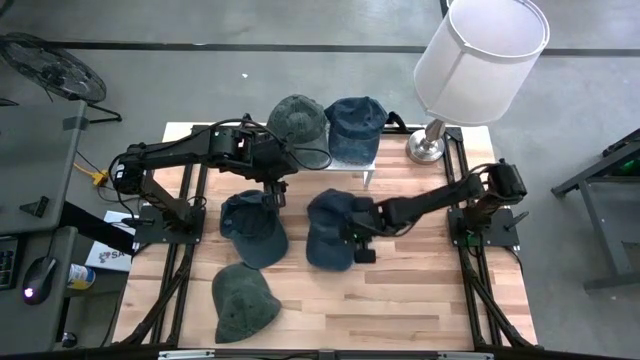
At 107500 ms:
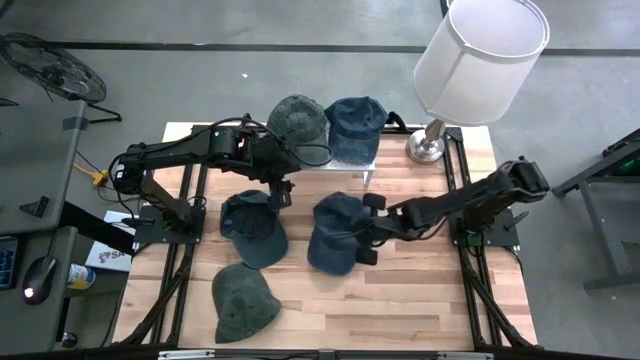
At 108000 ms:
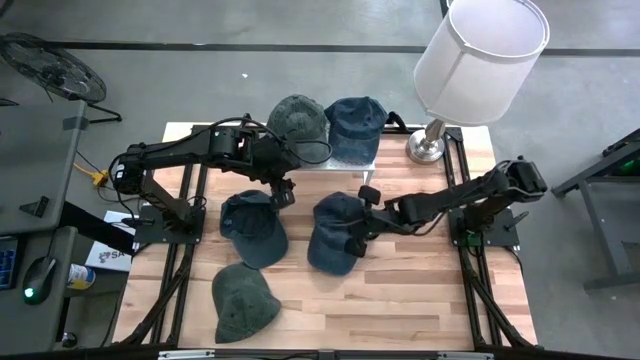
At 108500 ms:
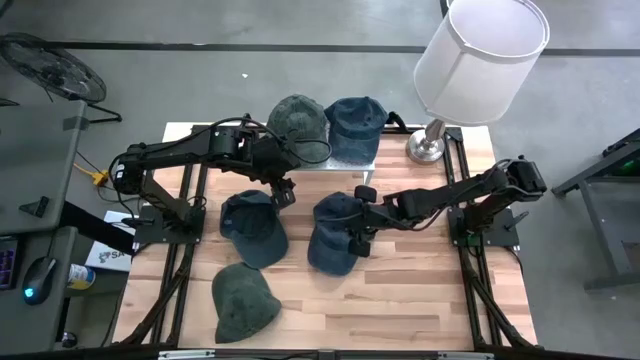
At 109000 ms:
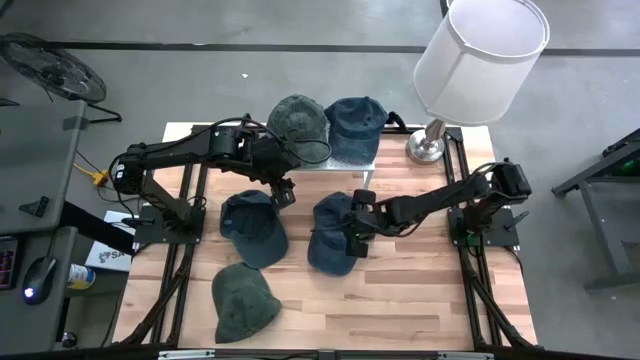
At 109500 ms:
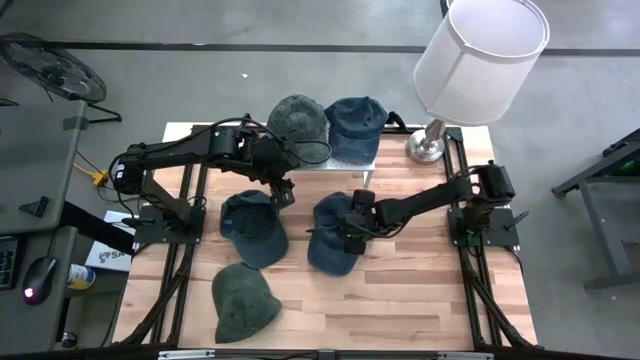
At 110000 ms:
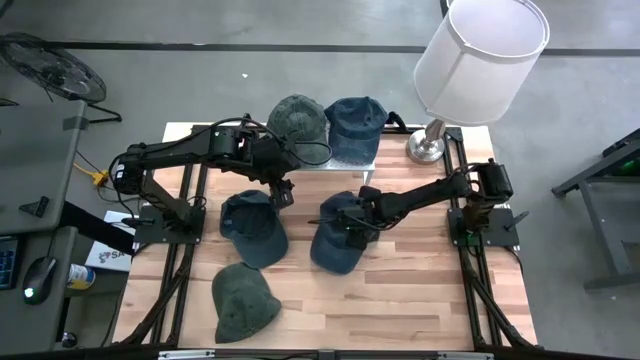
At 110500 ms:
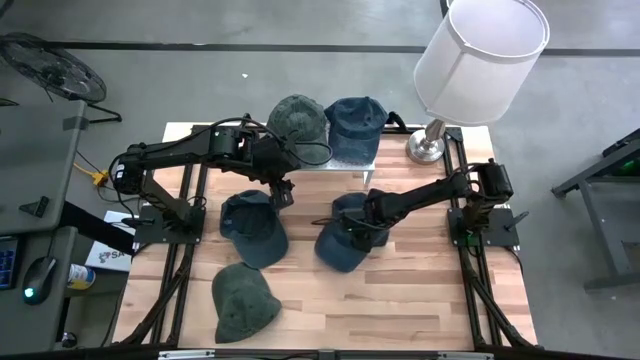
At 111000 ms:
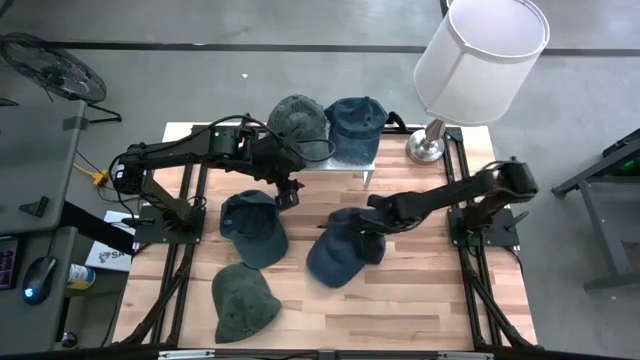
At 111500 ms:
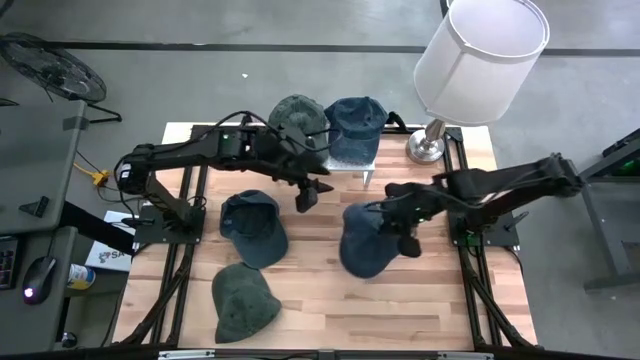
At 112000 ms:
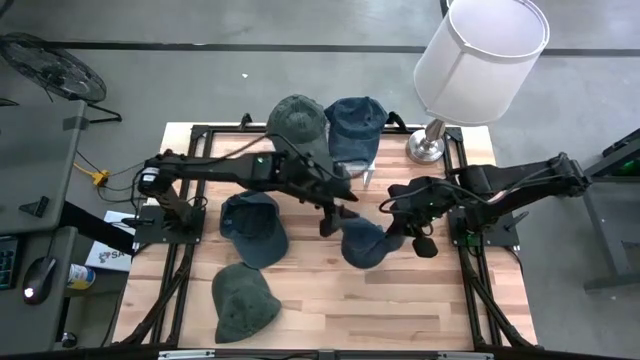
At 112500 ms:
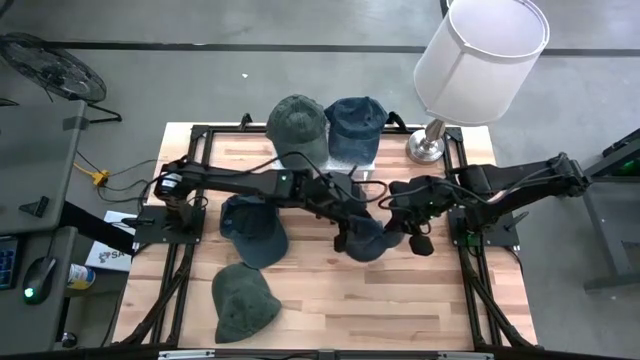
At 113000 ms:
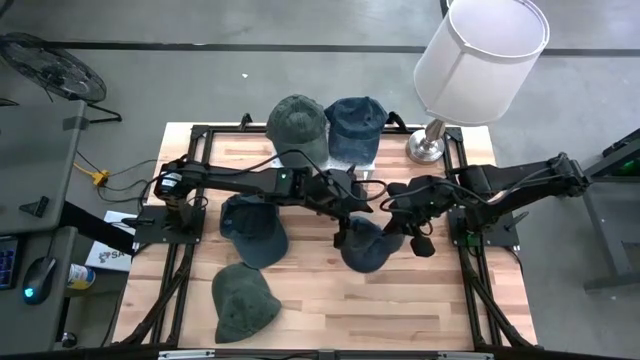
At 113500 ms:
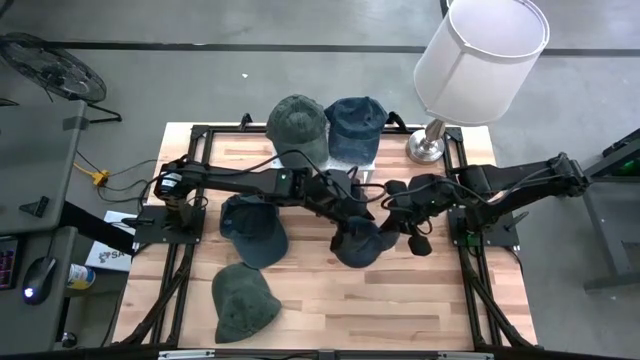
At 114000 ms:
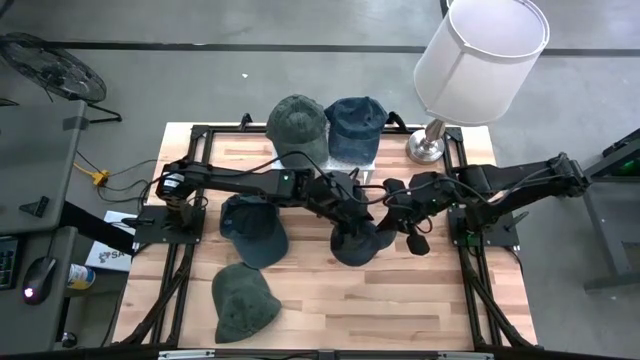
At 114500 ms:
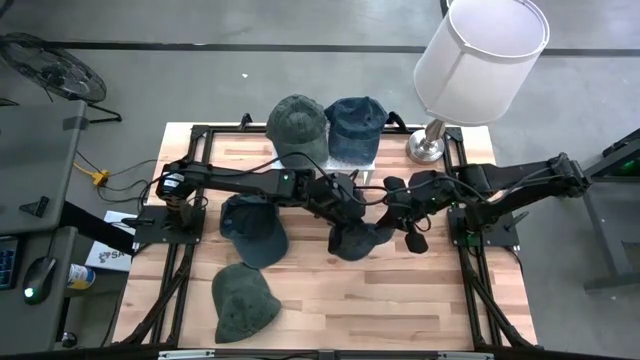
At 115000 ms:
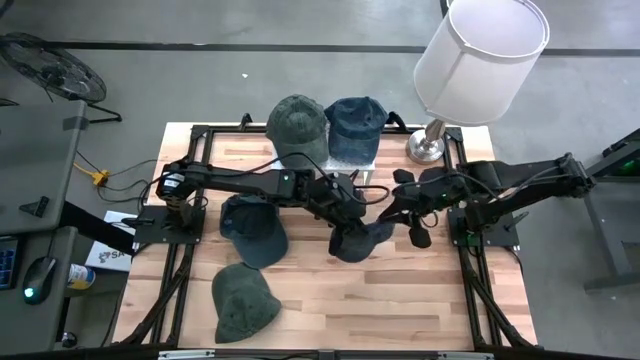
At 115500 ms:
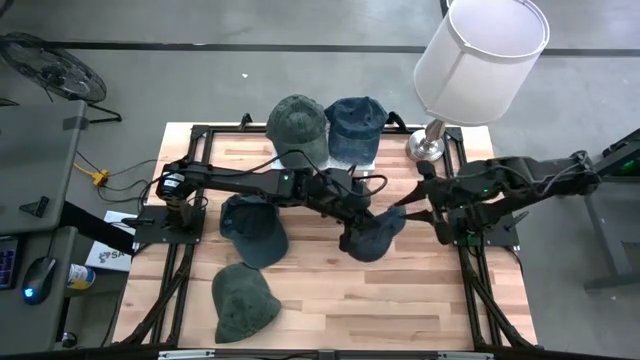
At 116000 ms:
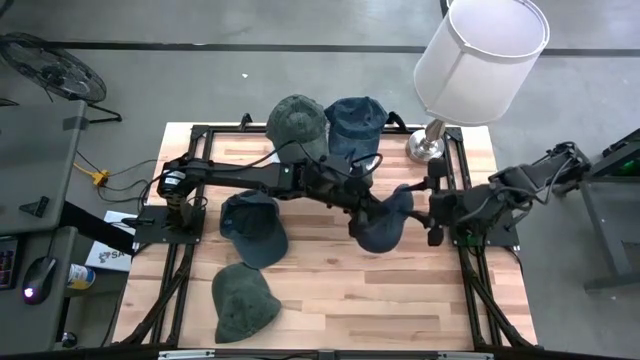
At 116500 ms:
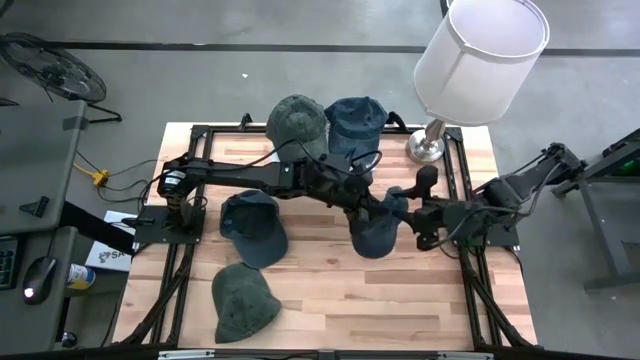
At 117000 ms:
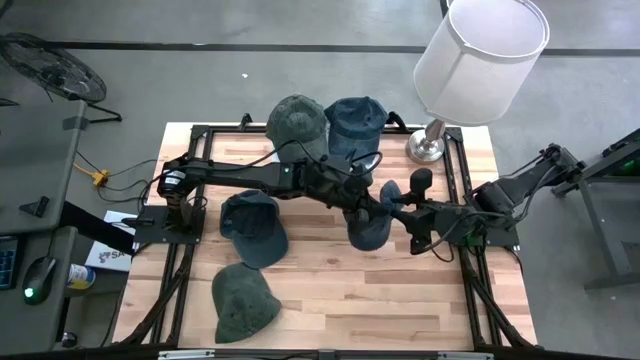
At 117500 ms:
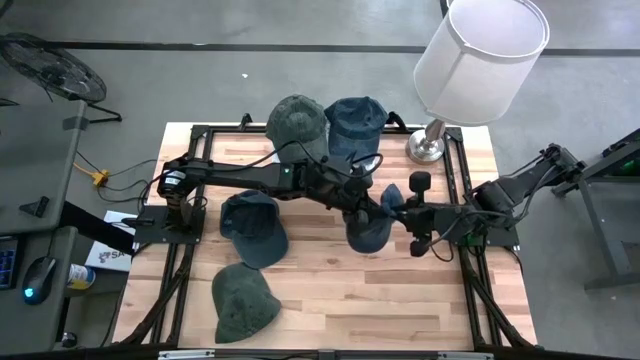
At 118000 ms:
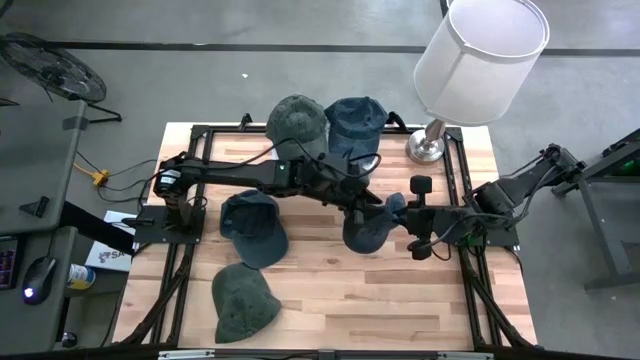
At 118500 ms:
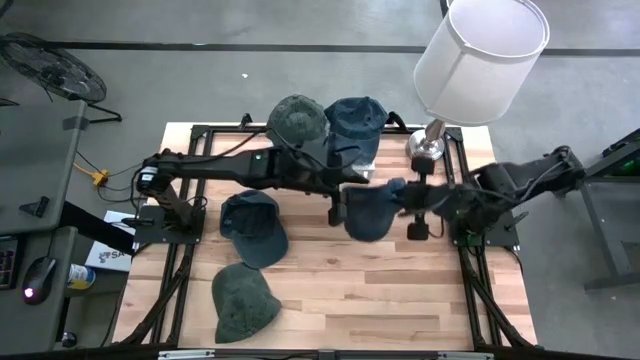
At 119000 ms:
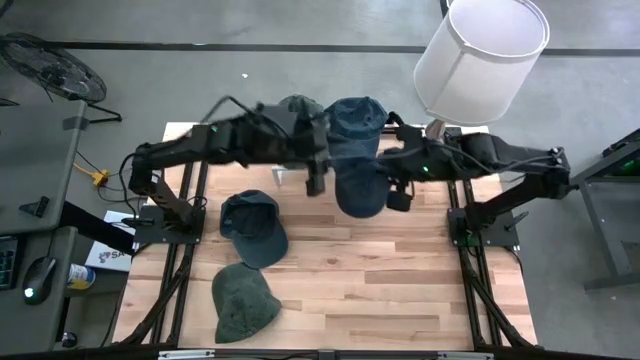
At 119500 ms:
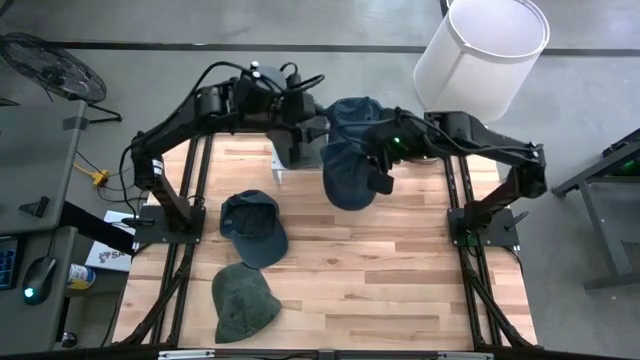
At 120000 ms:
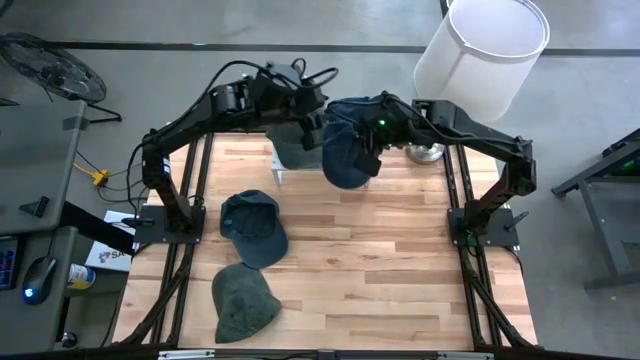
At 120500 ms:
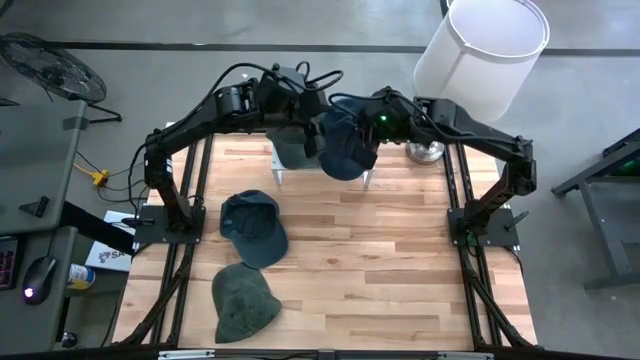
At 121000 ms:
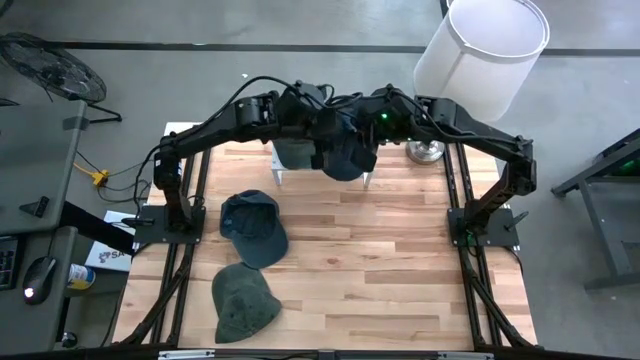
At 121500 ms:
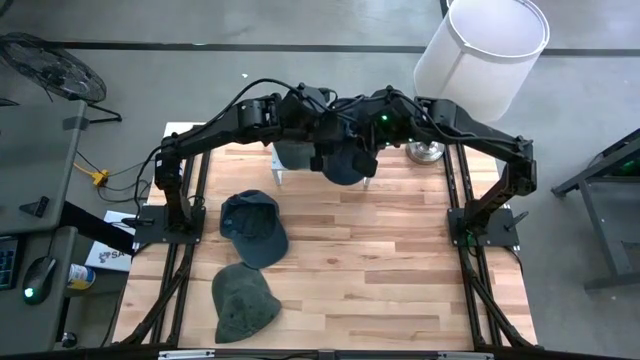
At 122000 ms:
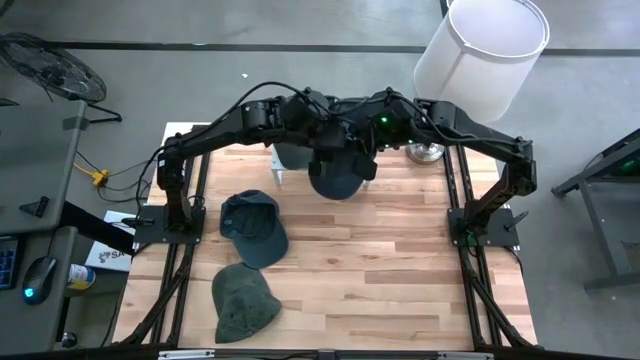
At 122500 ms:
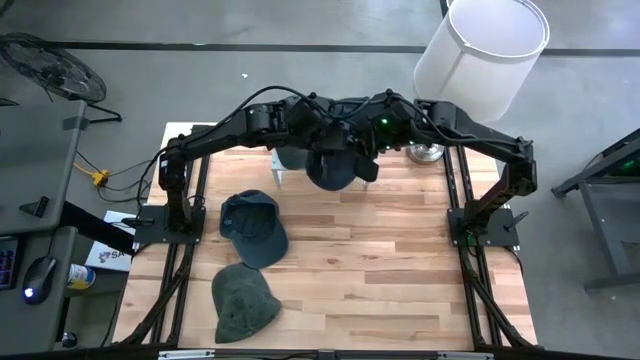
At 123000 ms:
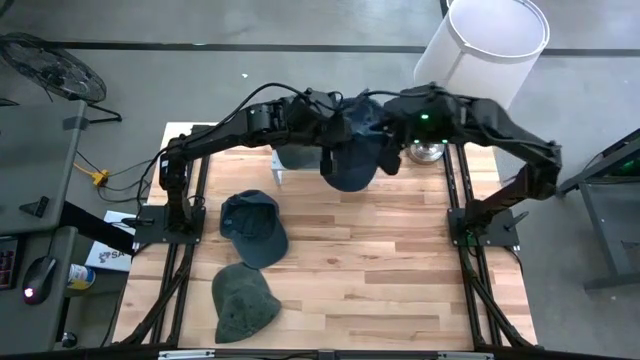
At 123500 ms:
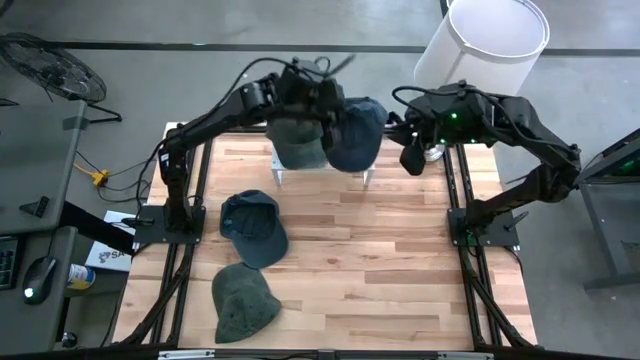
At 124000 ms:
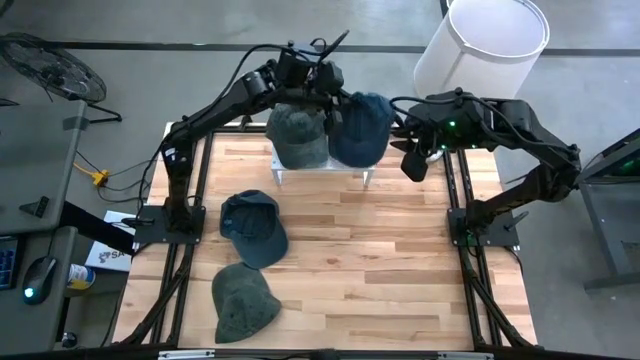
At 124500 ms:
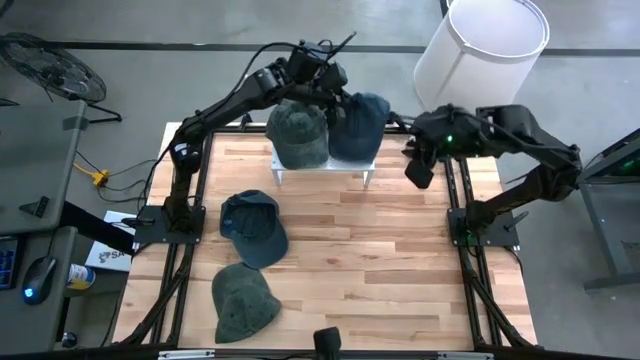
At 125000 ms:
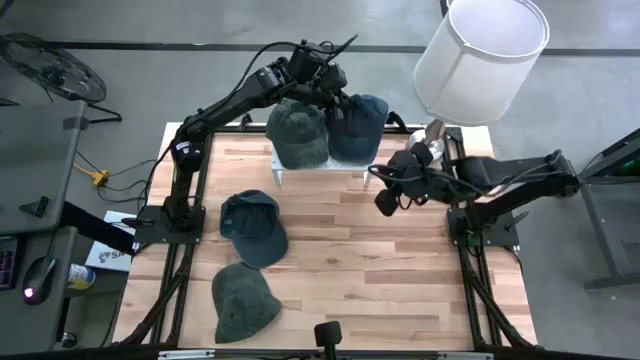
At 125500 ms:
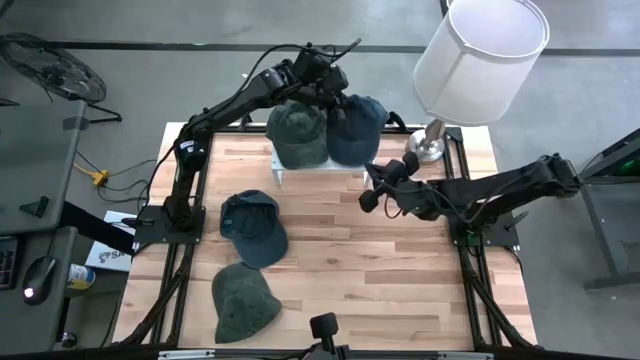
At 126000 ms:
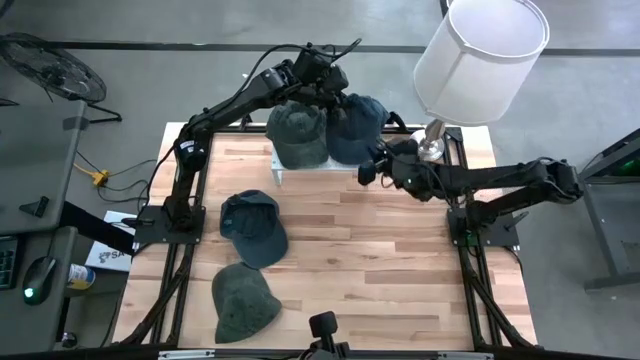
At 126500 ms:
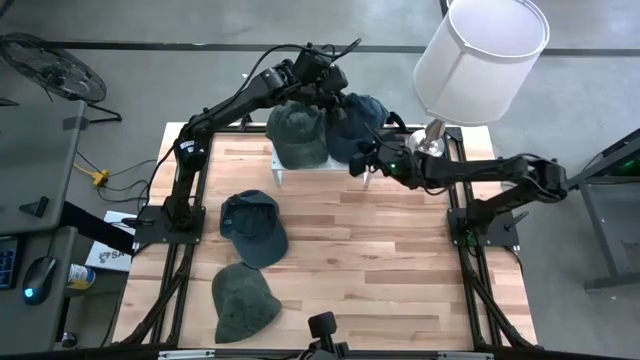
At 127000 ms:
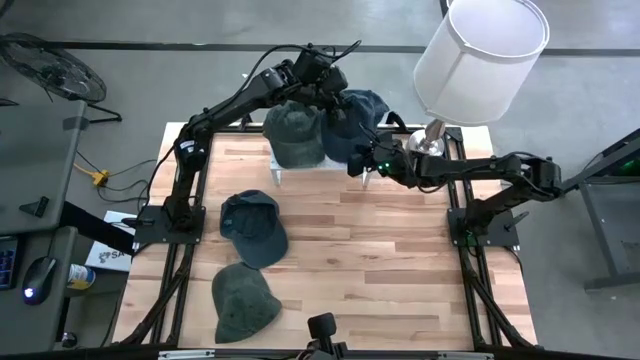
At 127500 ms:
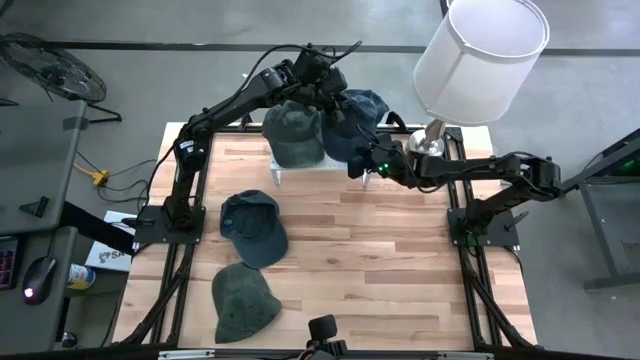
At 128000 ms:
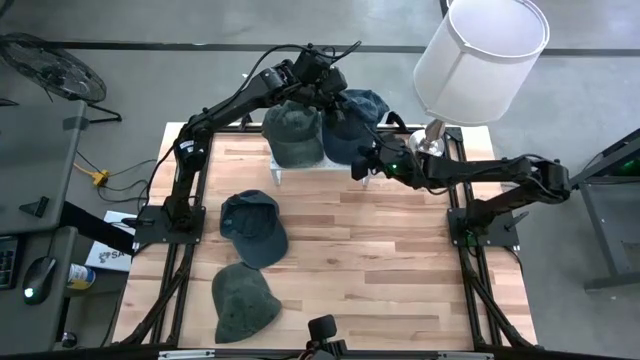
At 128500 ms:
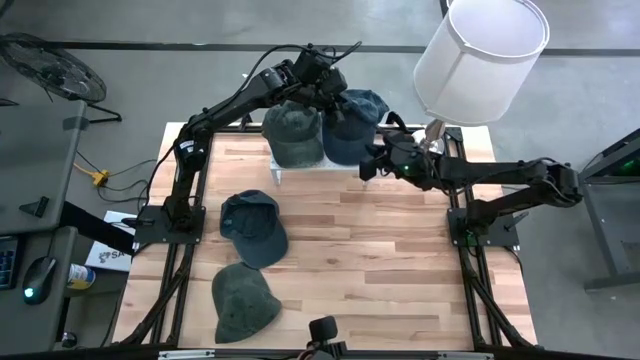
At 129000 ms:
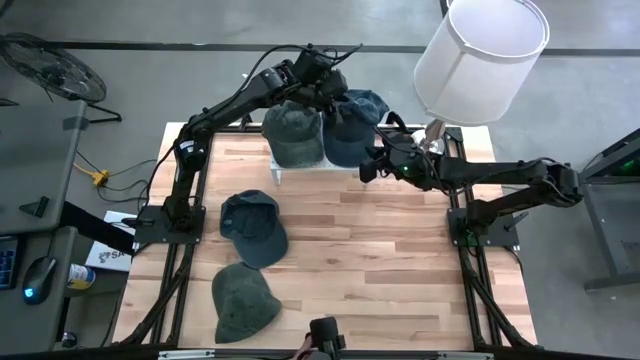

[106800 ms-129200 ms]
Task: Pick & Place hat
Stack the right blue cap on top of the blue cap on the shelf
